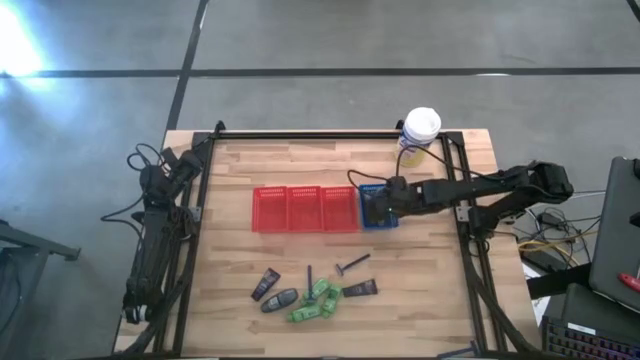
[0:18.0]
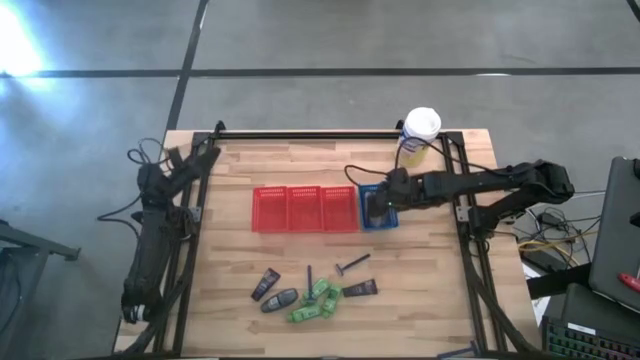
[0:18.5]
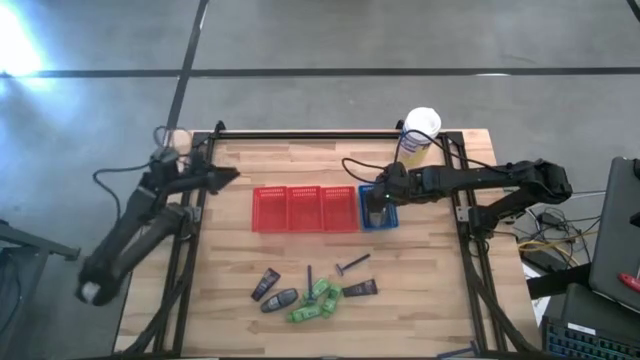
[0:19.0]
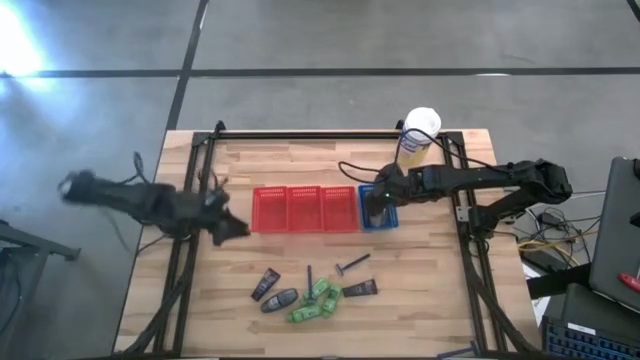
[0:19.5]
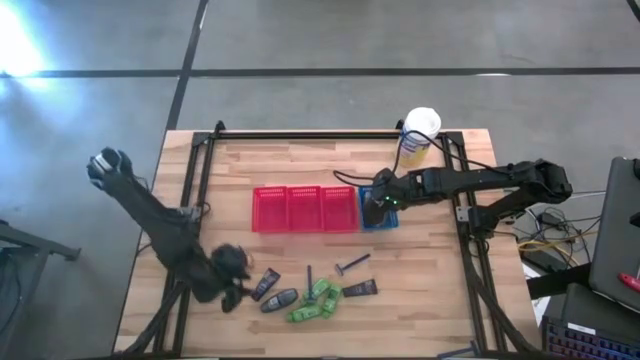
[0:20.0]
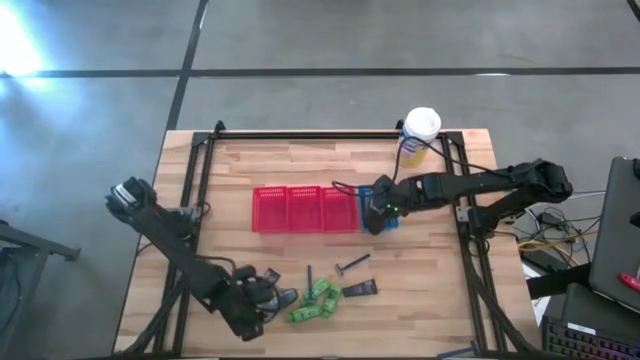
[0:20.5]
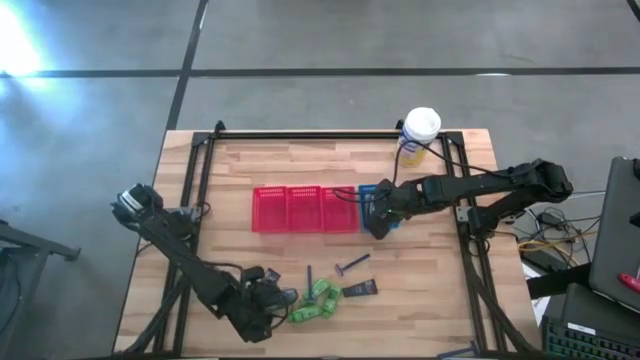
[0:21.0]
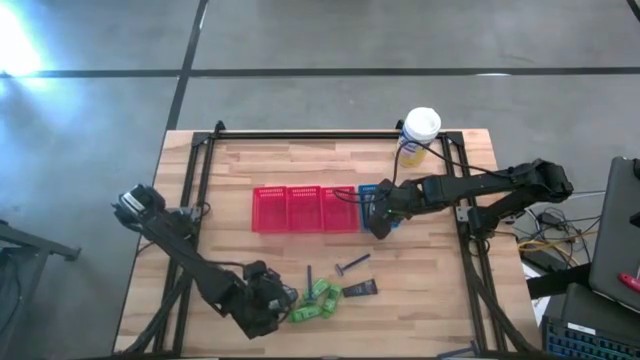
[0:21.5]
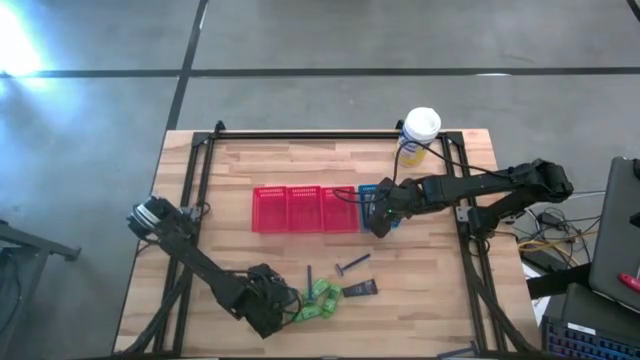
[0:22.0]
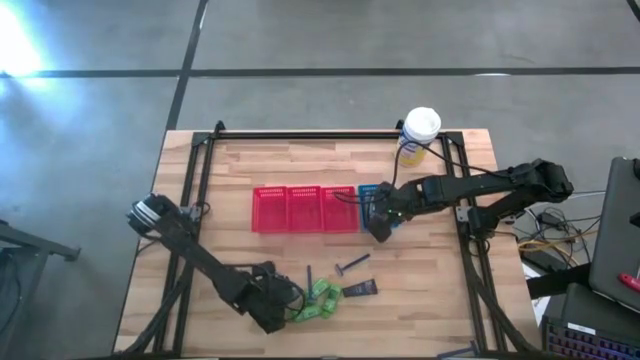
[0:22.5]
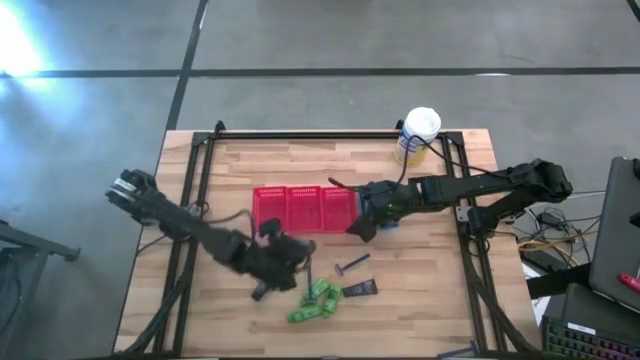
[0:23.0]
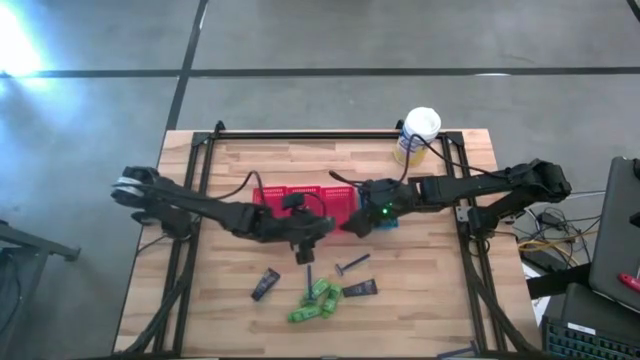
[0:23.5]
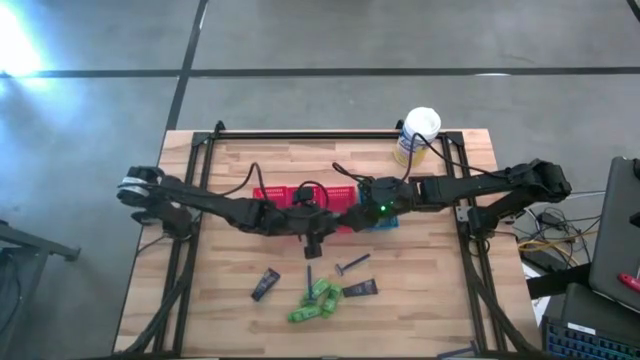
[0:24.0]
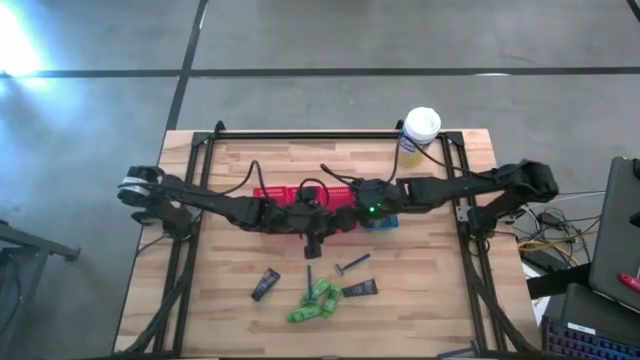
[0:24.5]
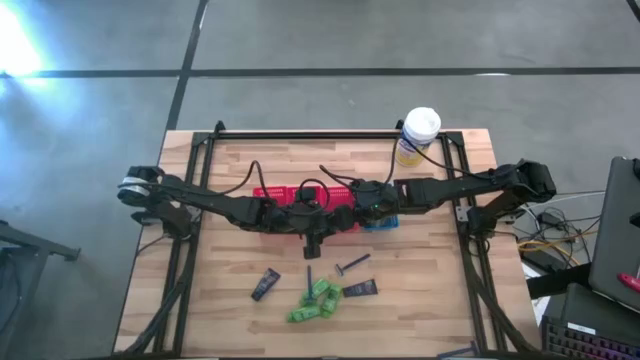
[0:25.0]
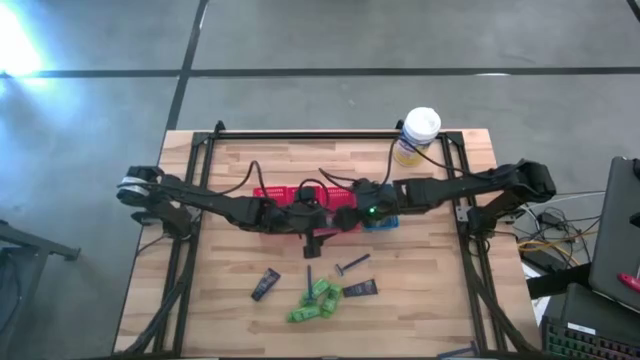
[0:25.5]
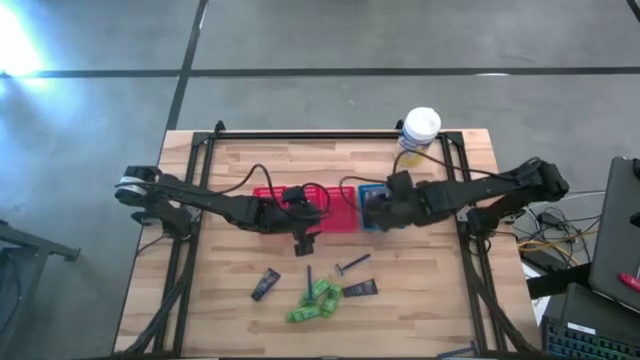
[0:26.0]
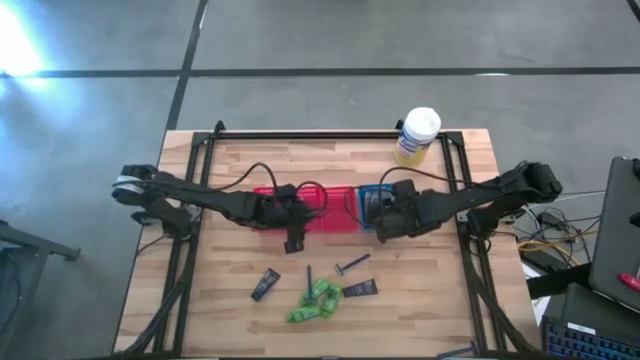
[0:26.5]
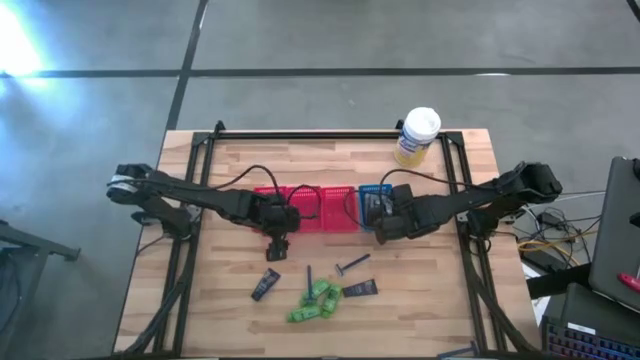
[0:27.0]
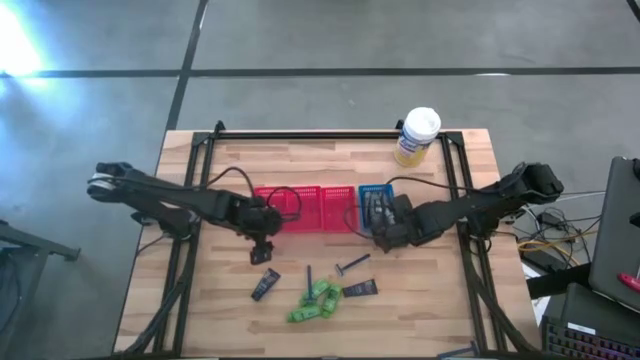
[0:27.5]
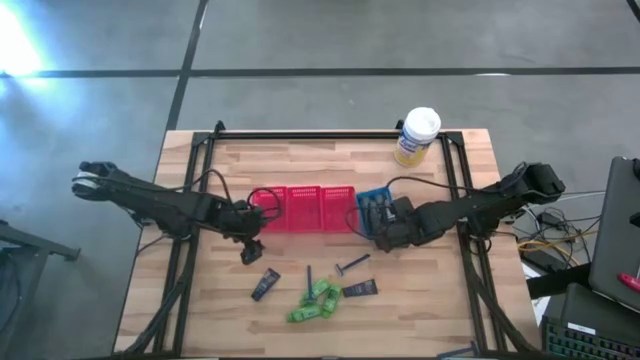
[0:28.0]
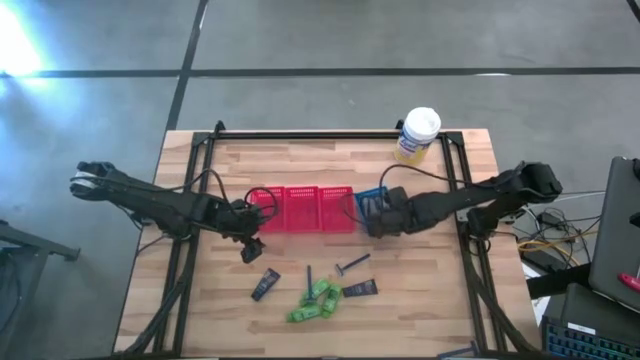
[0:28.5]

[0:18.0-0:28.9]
Task: Pick & Place Travel size toiletries
Put the black deodorant into the blue bin

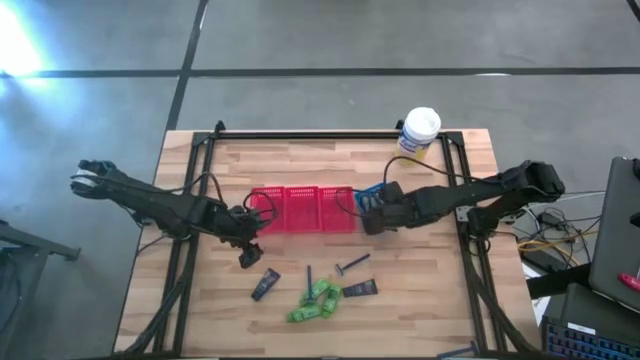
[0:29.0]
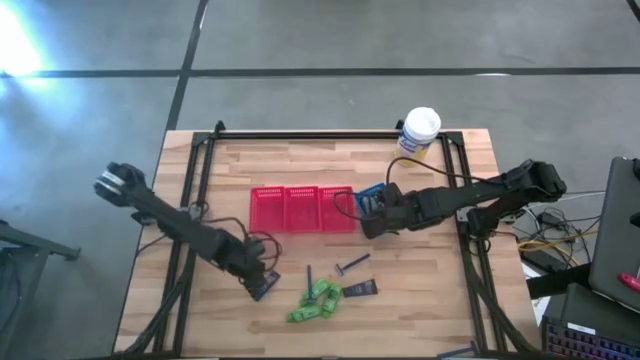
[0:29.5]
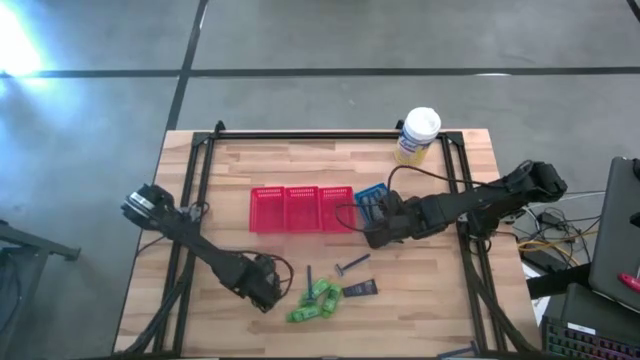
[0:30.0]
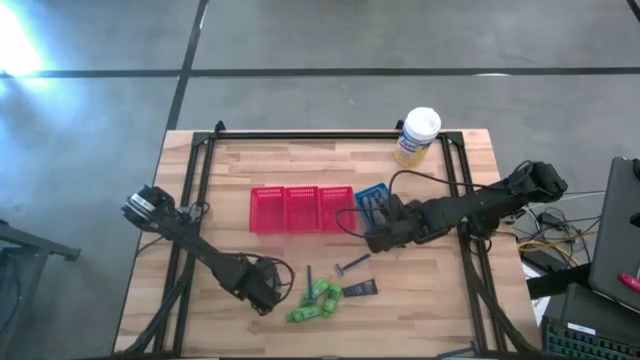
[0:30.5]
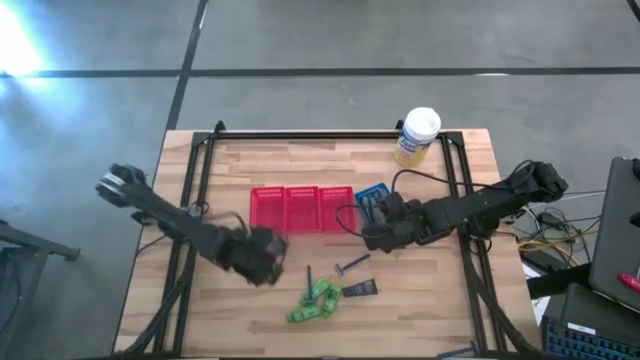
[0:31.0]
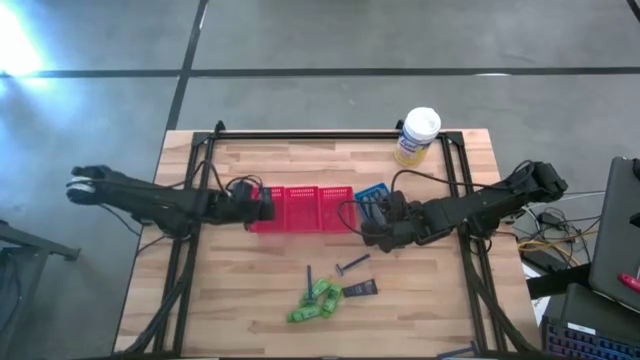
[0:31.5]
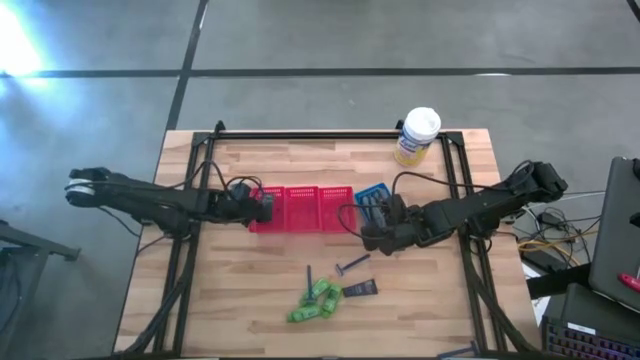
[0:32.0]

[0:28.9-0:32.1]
Put the blue shave cream into the left red bin

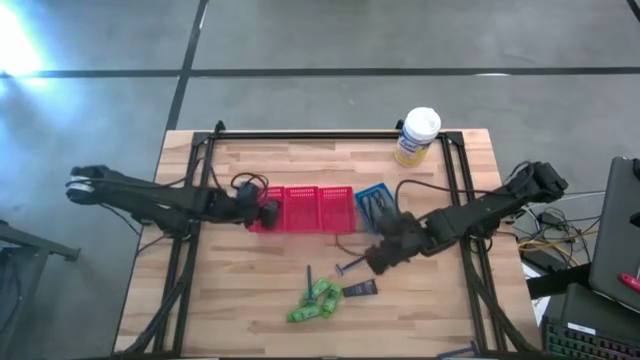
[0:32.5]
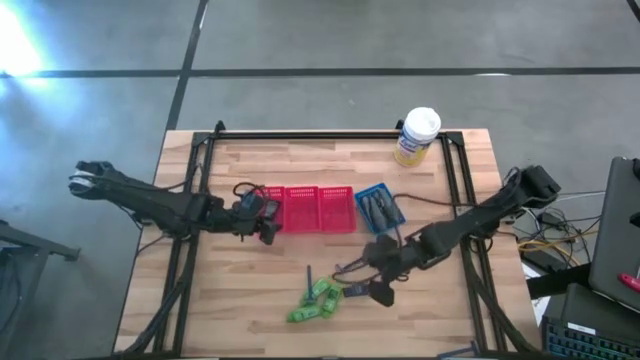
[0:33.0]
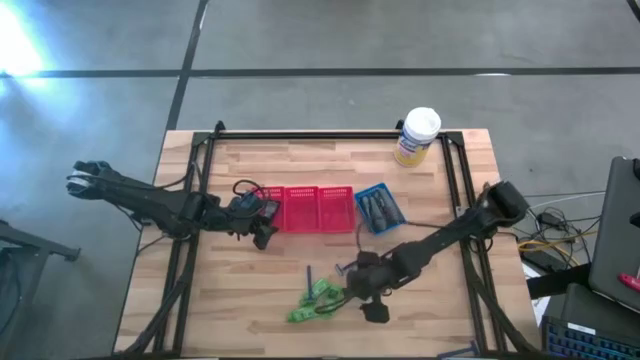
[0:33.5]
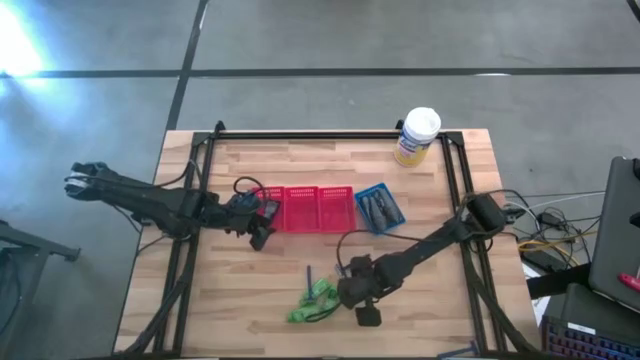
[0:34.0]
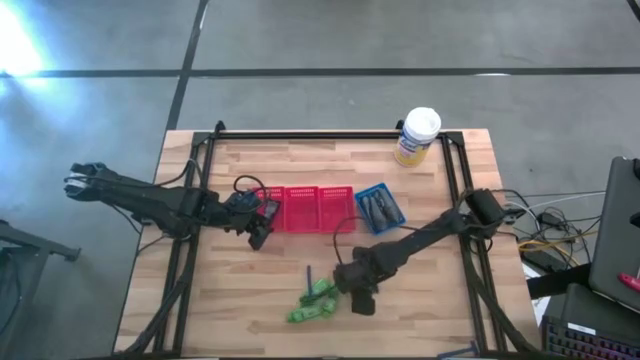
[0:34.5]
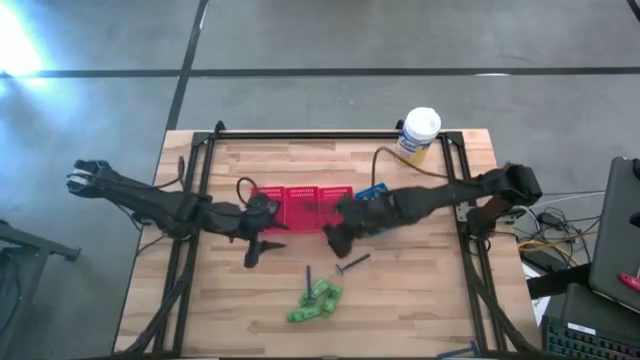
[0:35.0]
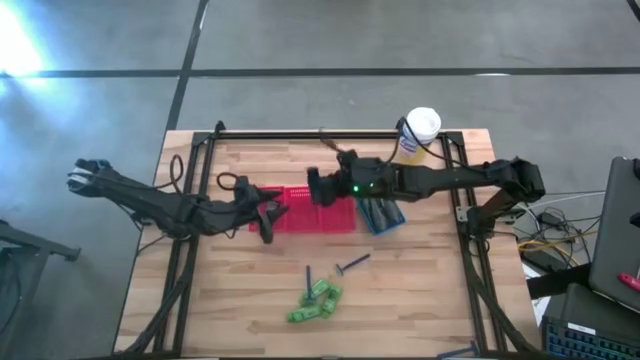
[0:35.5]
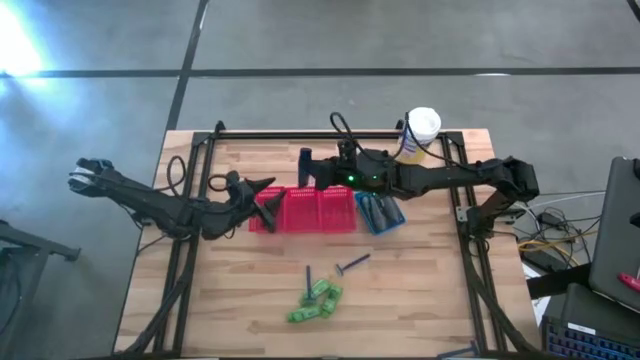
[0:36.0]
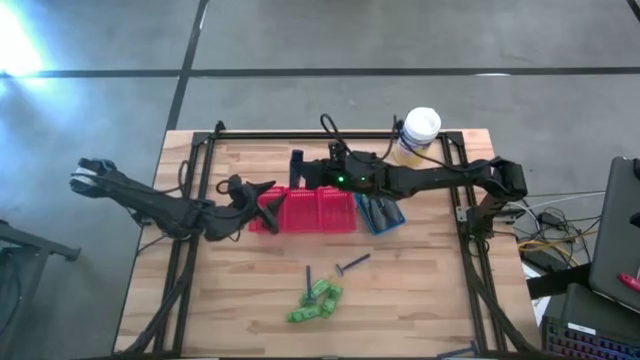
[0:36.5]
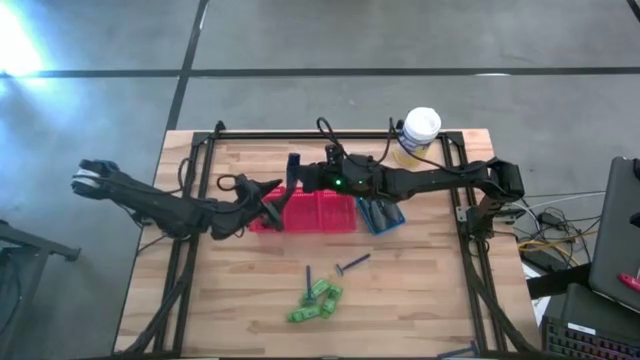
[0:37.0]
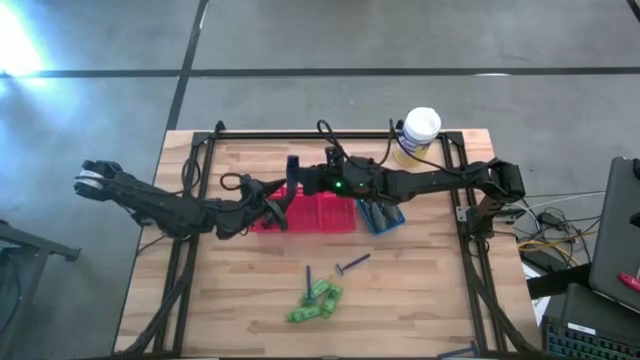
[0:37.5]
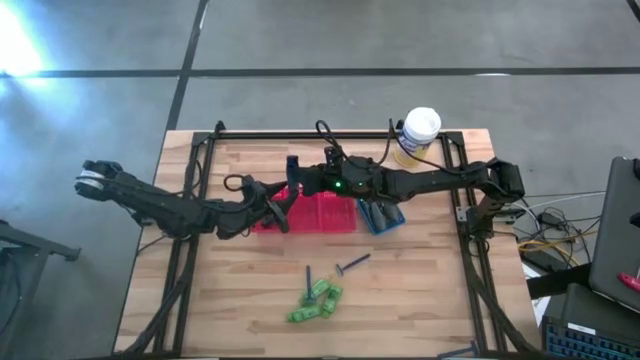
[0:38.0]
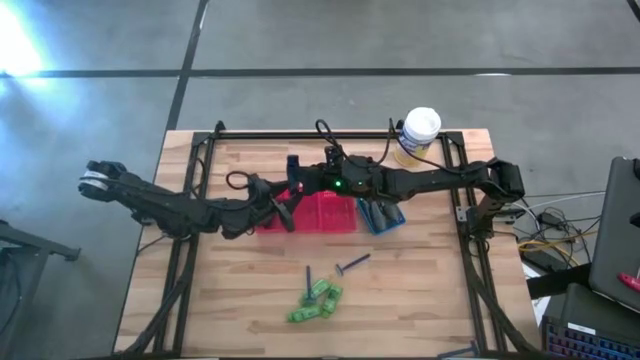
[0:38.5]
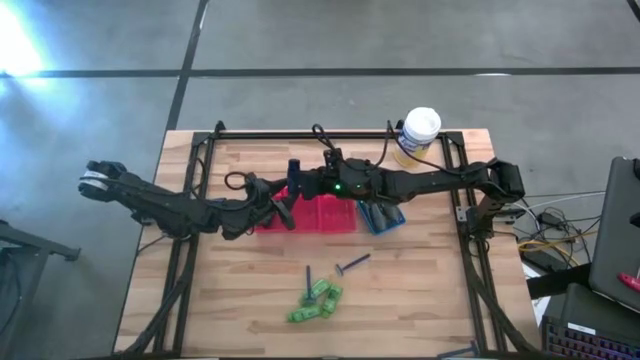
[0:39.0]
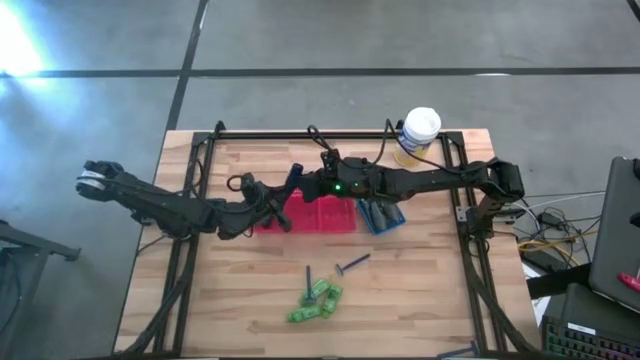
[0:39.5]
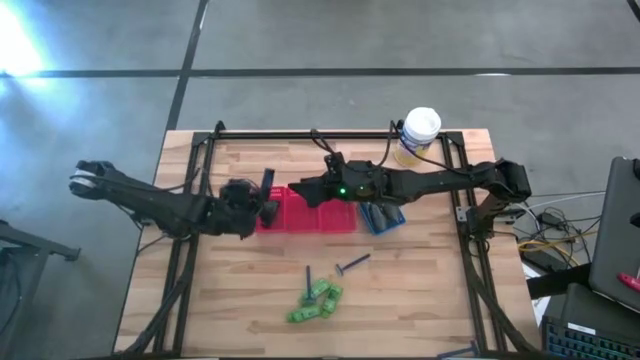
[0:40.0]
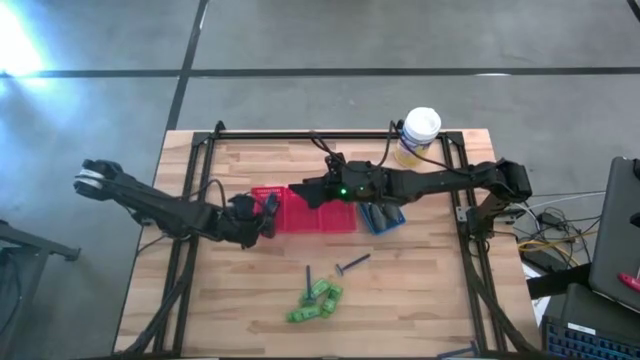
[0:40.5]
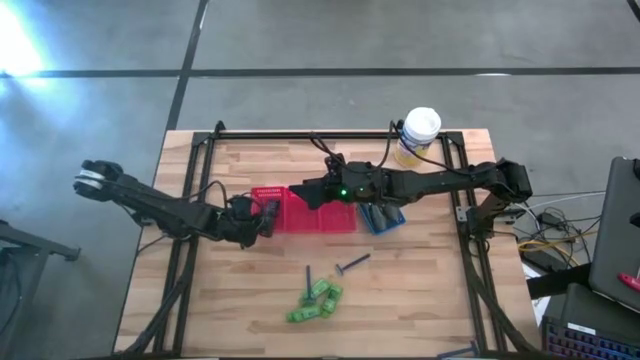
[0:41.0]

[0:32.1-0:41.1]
Put the blue shave cream into the left red bin
